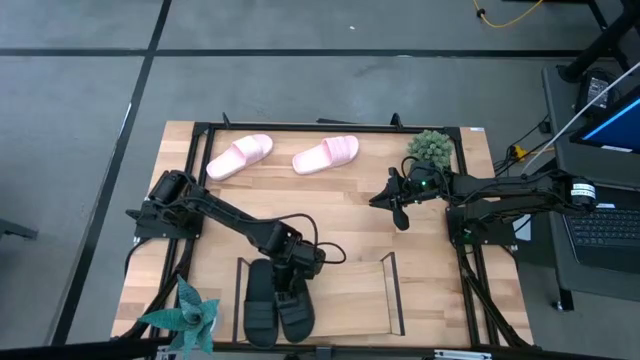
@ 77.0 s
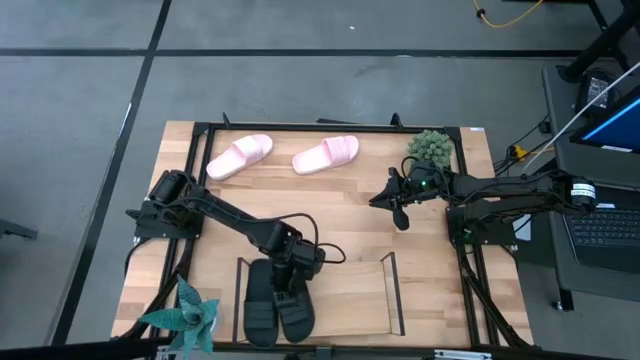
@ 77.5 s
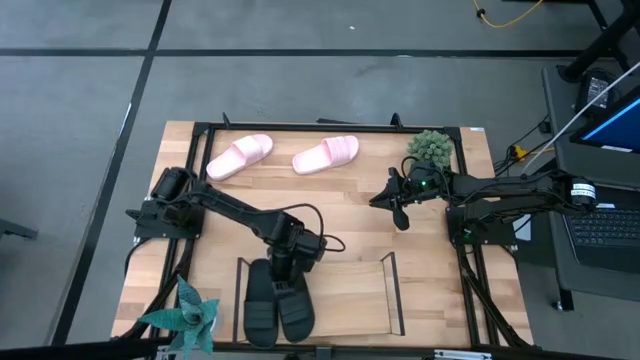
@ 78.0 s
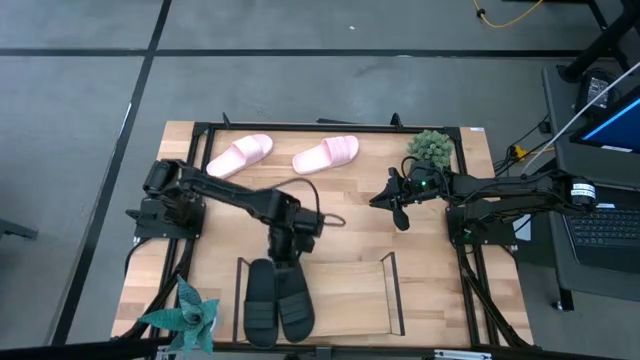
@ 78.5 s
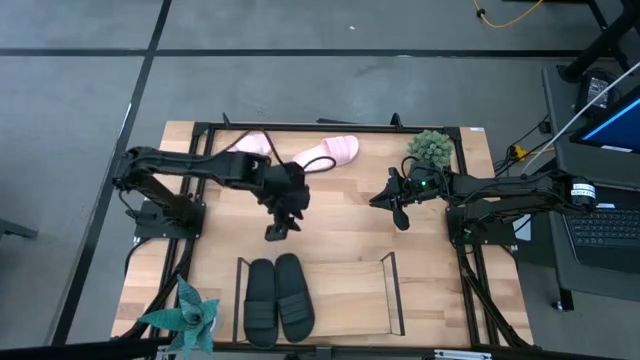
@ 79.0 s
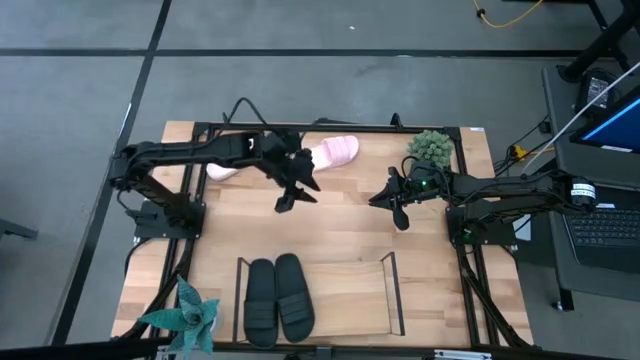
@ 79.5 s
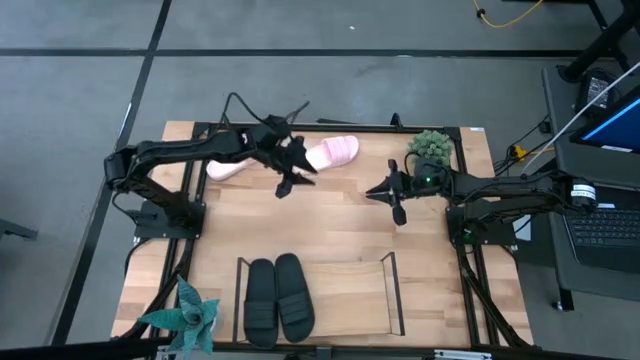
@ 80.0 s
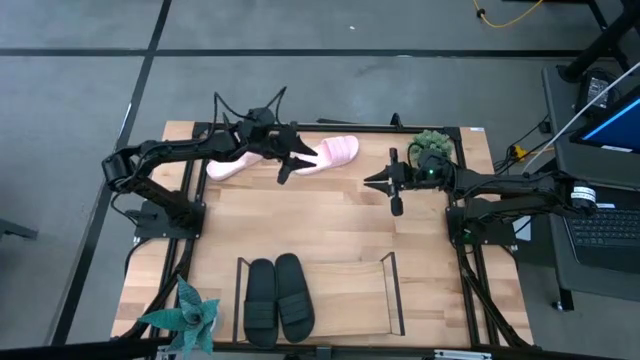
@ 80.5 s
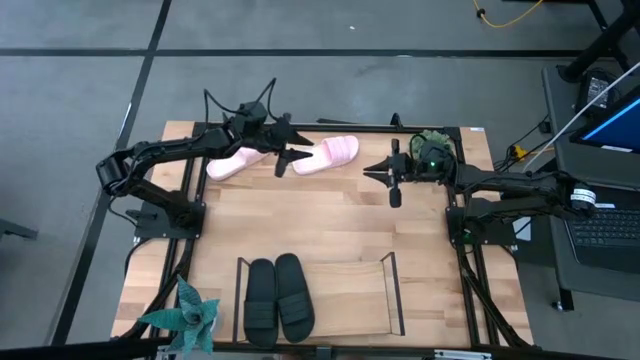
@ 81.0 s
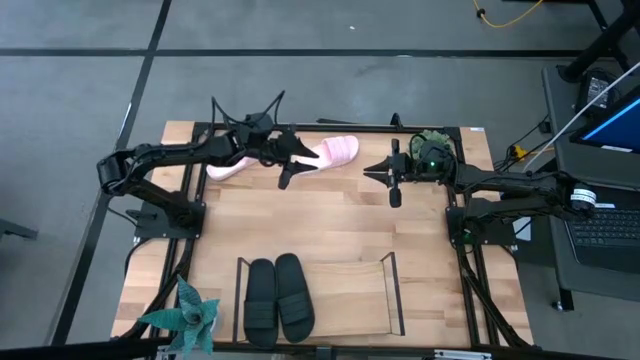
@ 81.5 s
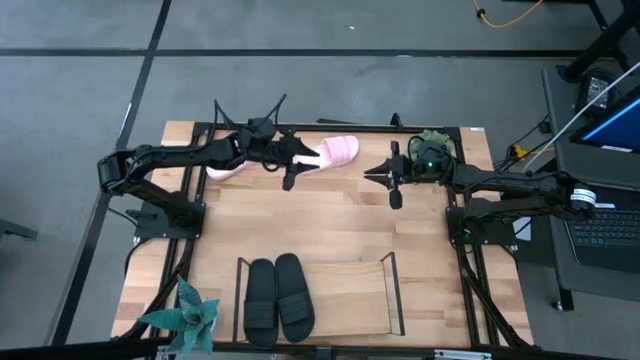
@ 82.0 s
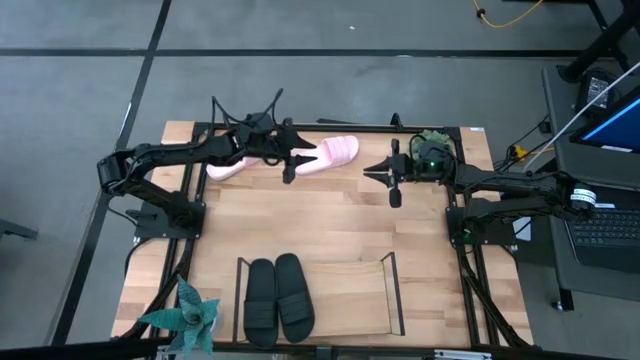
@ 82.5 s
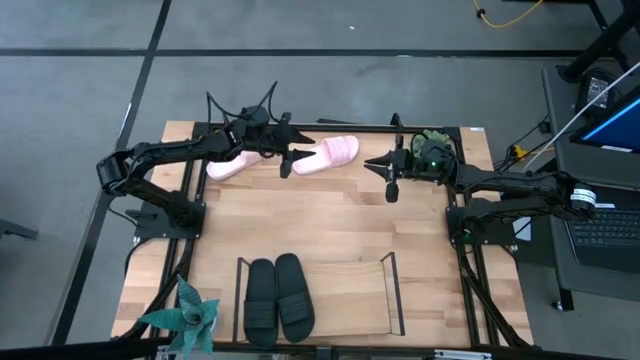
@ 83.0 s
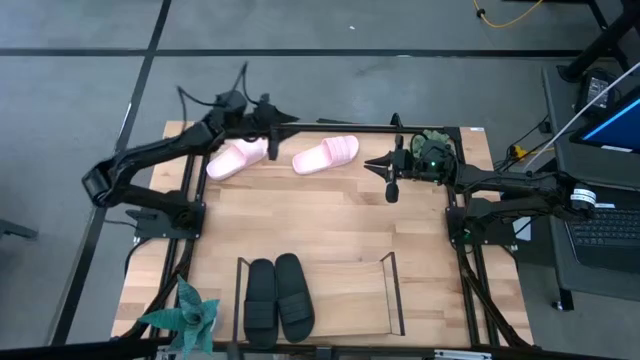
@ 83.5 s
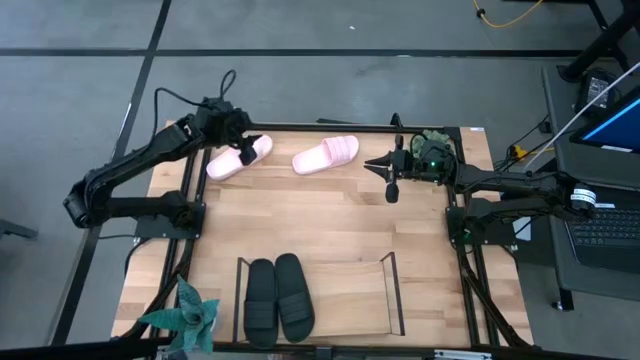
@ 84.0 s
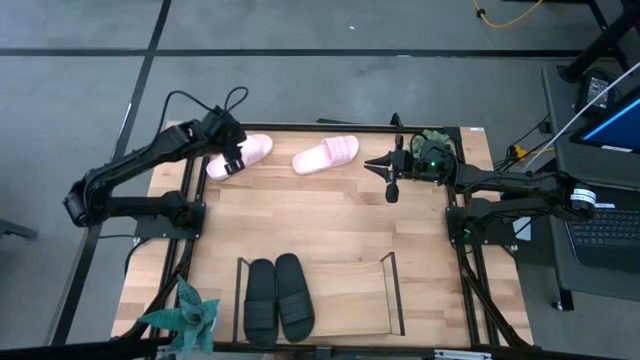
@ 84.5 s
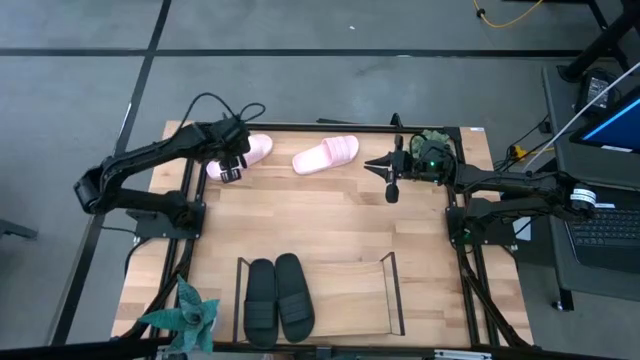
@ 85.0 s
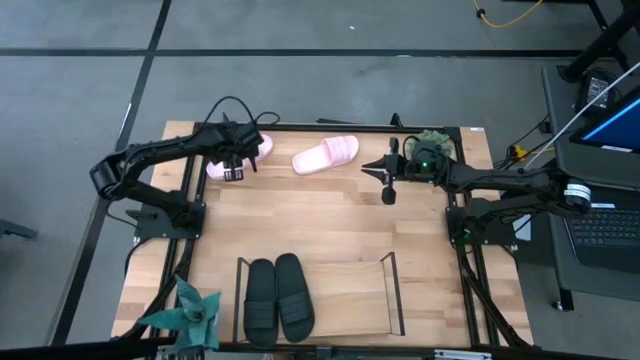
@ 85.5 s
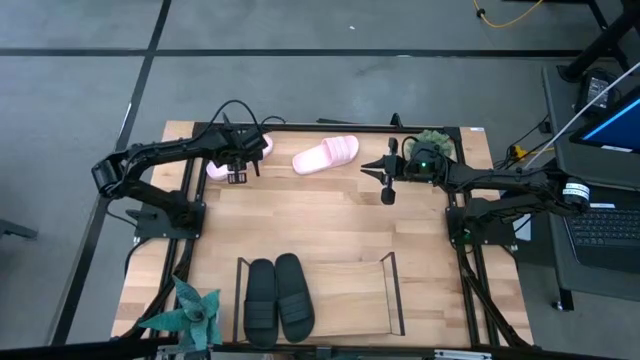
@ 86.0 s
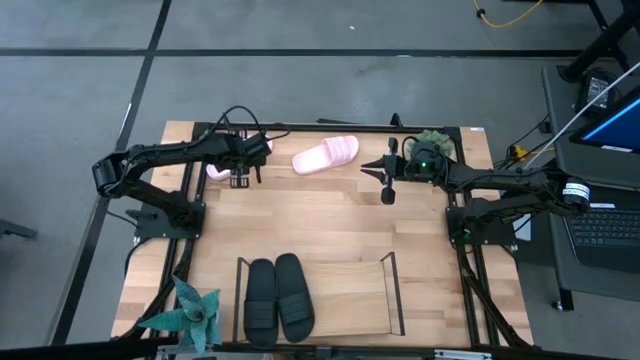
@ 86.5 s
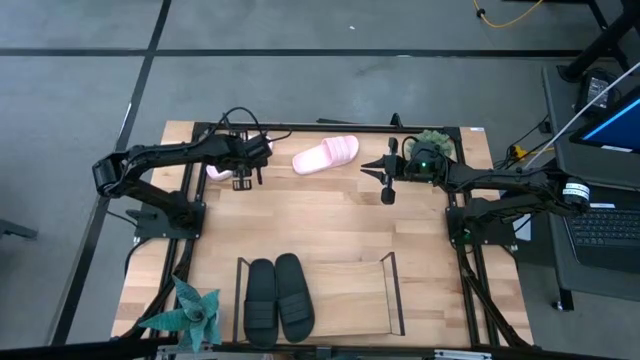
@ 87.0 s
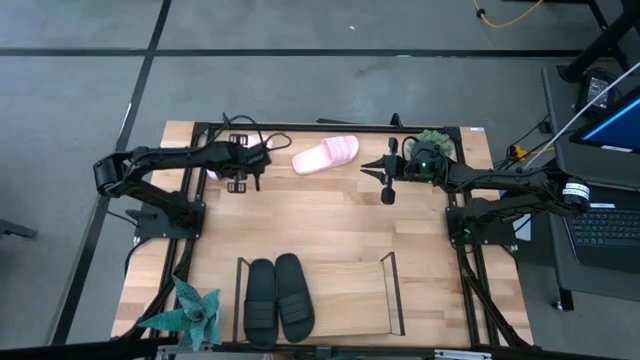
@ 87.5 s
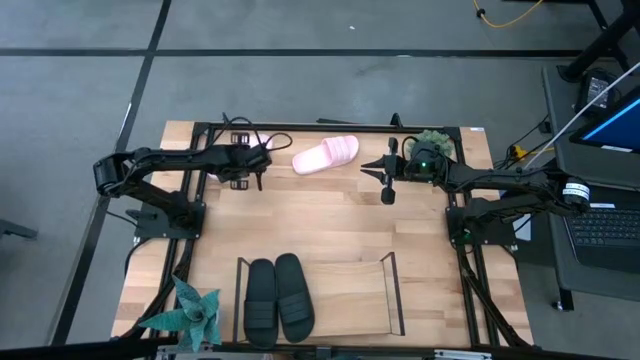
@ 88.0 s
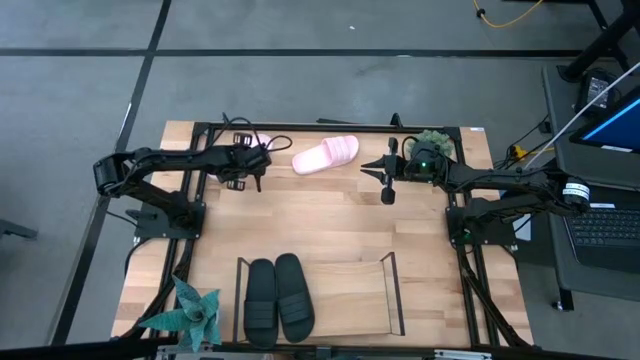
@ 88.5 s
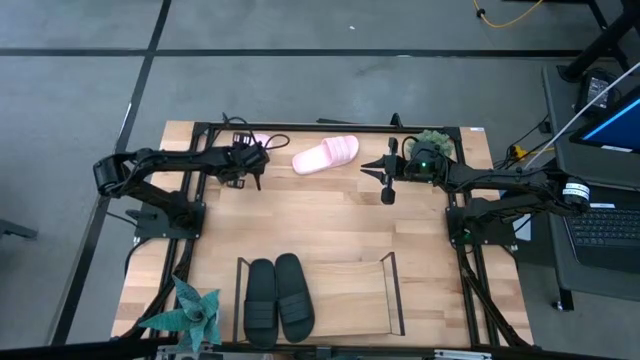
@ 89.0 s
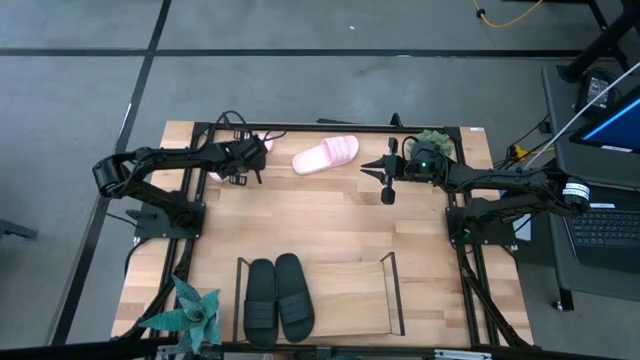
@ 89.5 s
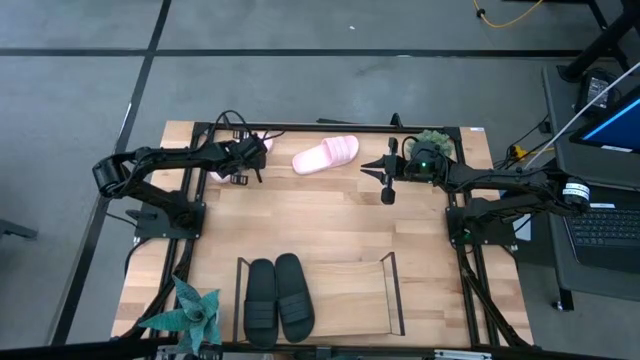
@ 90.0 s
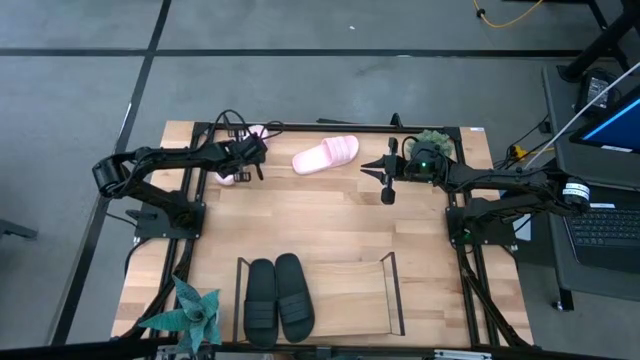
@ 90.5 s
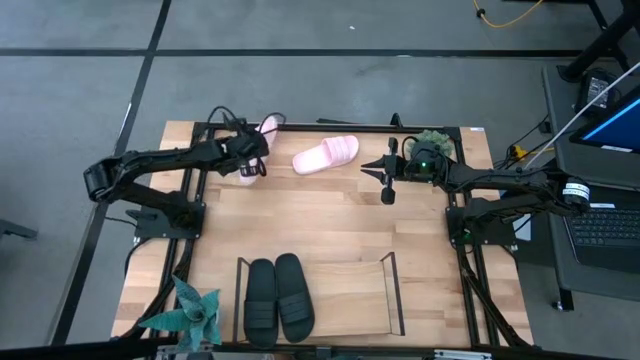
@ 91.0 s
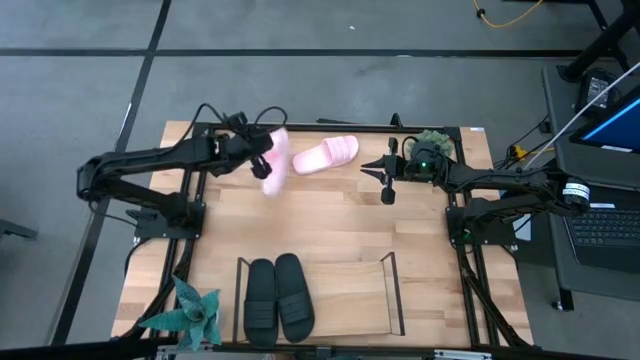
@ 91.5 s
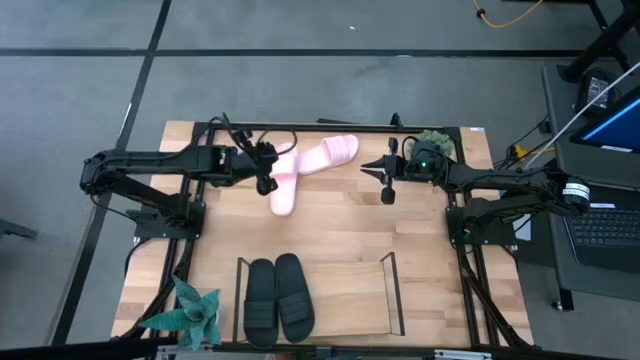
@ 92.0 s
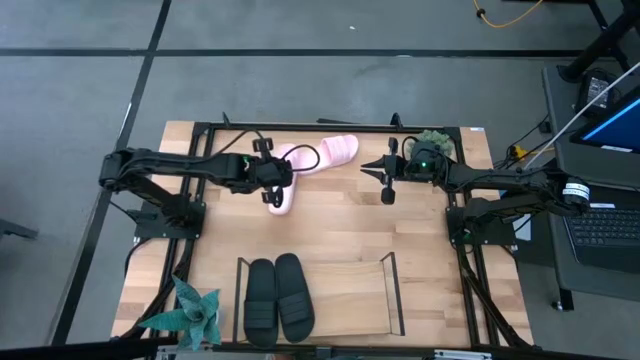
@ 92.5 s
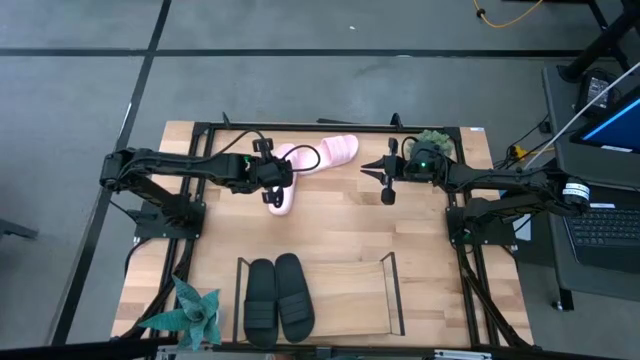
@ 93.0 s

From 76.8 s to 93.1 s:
Task: Pick and place slides into the shelf
Put the right pink slide on the shelf

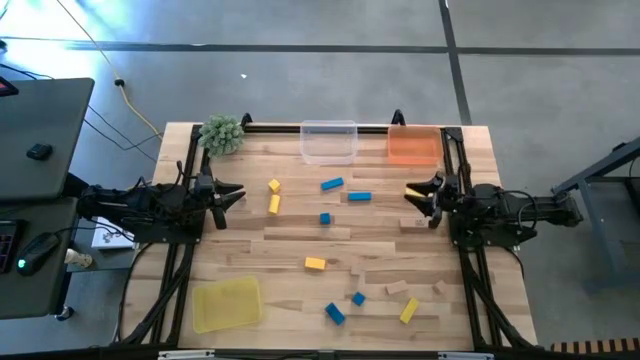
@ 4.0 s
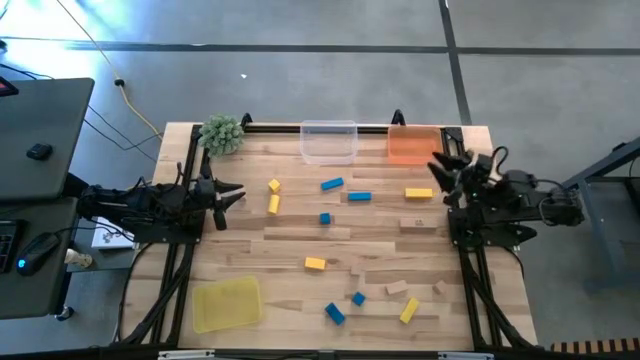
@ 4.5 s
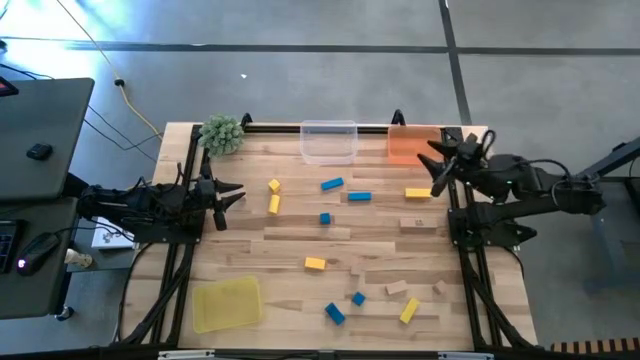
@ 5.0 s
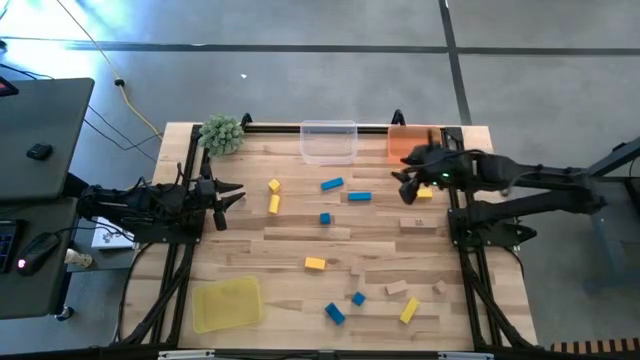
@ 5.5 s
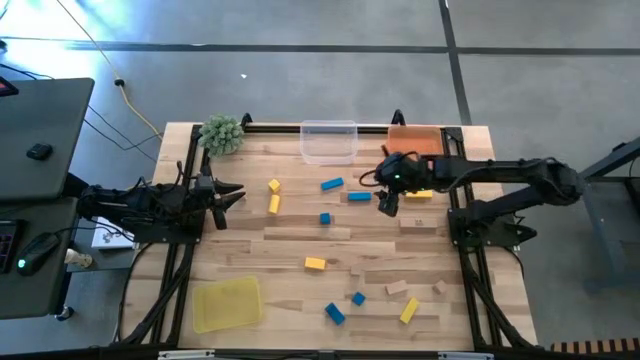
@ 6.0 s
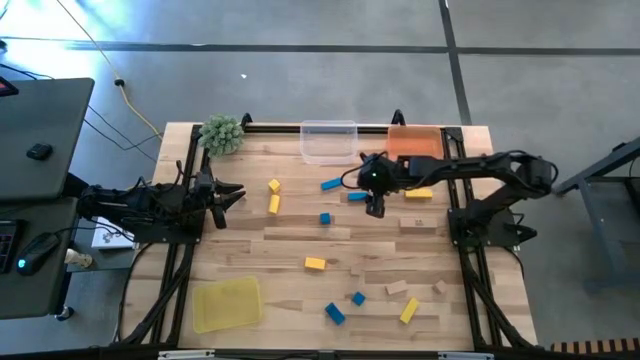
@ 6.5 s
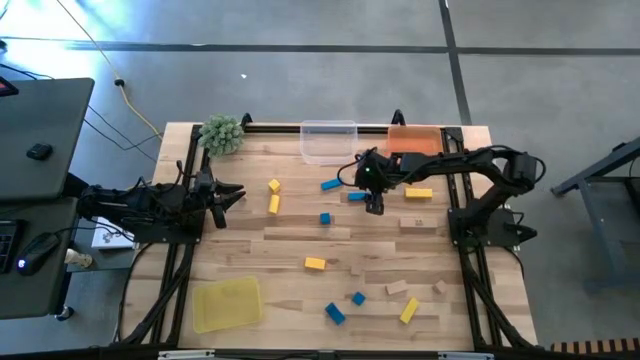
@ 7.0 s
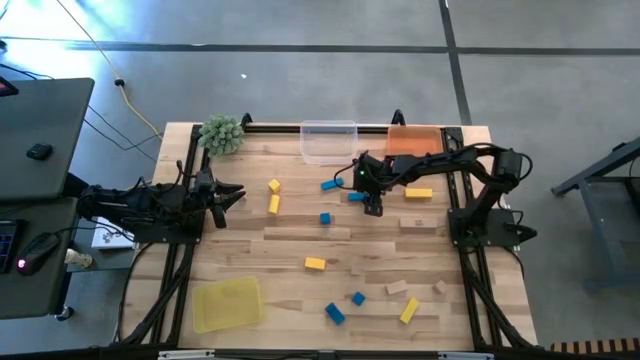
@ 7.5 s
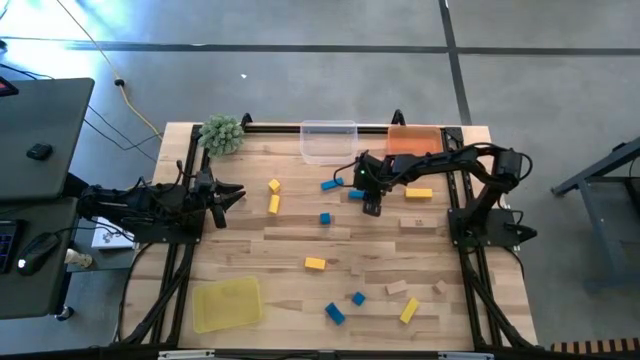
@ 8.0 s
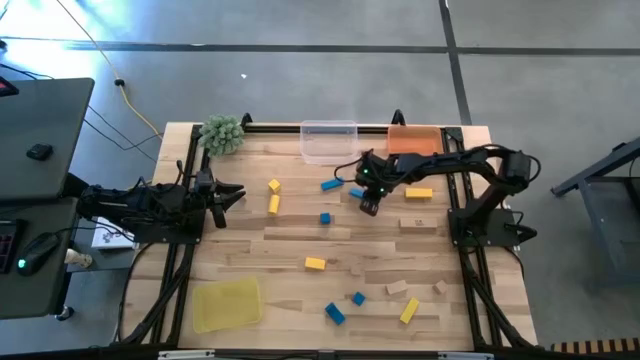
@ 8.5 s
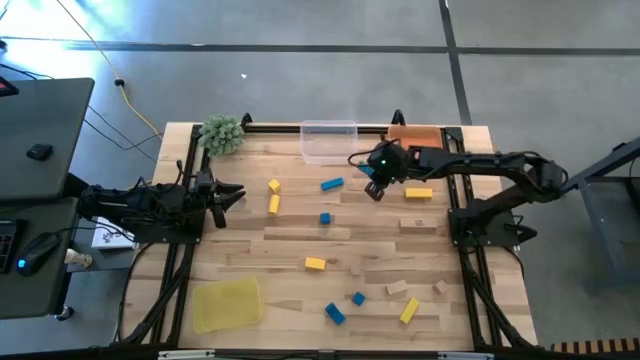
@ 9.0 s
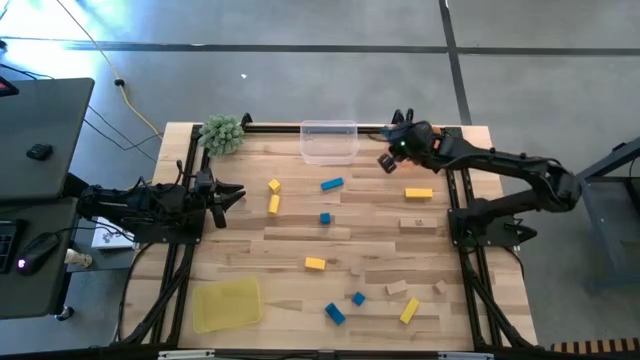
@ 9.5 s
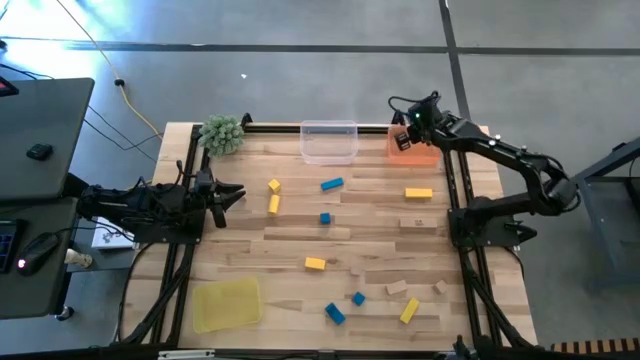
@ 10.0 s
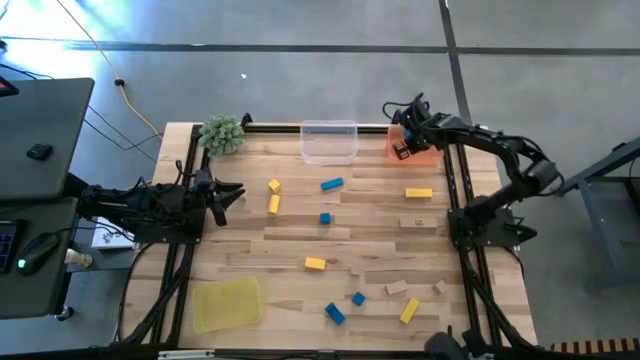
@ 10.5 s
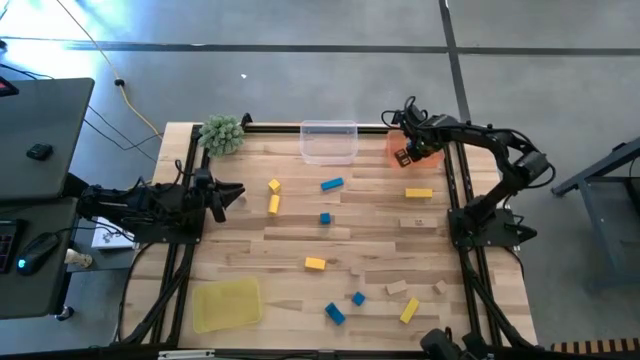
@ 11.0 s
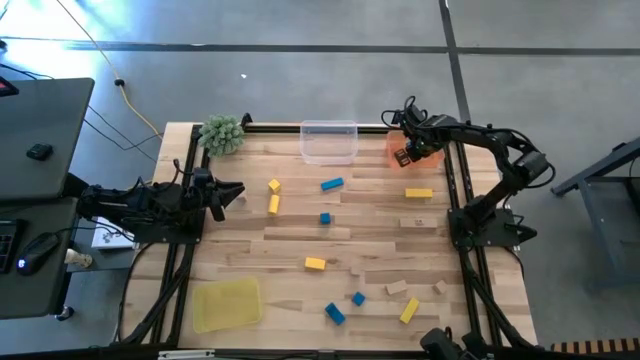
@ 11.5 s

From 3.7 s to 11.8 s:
Task: Sort & place blocks by color
Put the blue block into the orange bin
